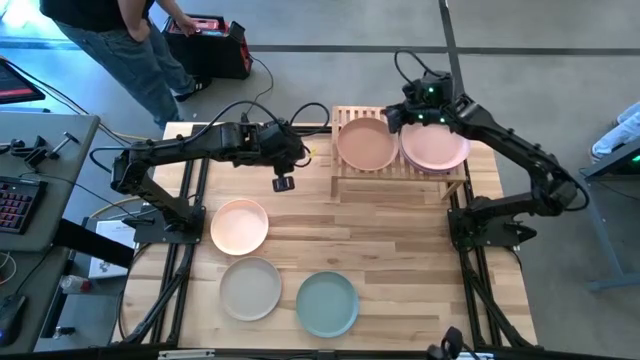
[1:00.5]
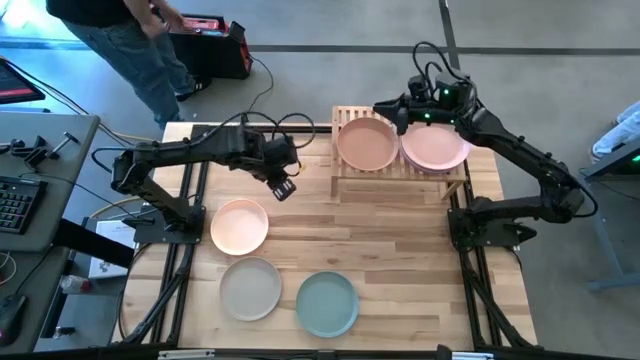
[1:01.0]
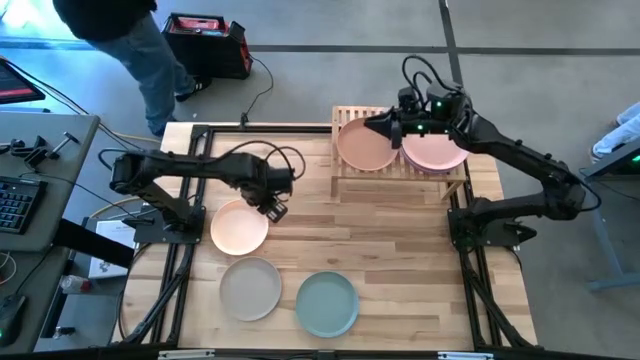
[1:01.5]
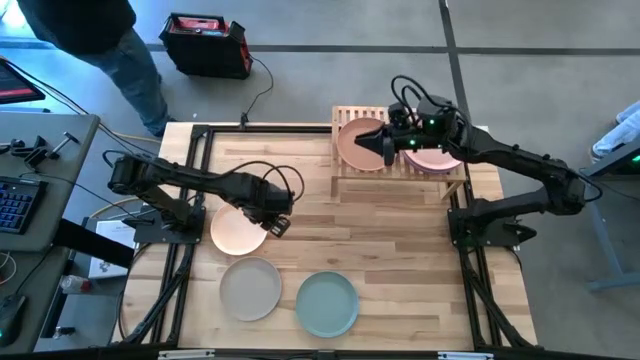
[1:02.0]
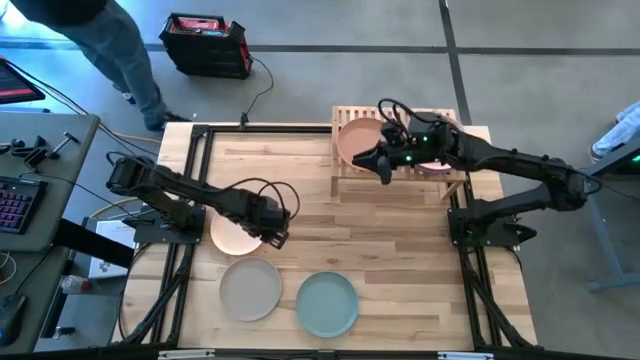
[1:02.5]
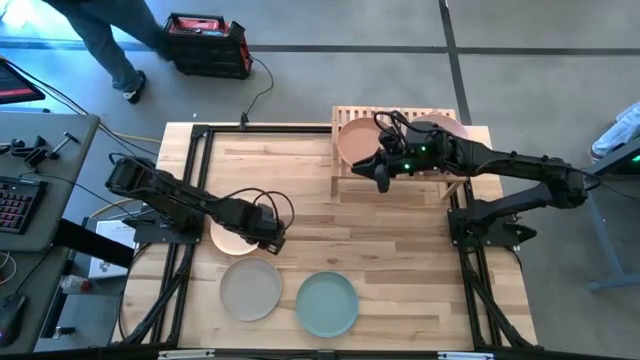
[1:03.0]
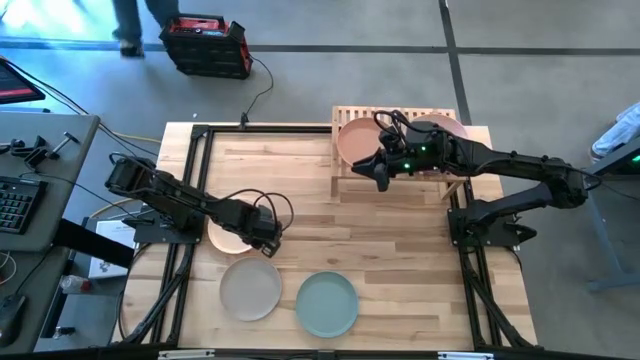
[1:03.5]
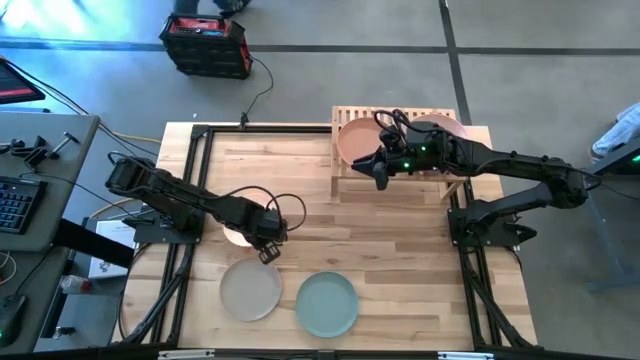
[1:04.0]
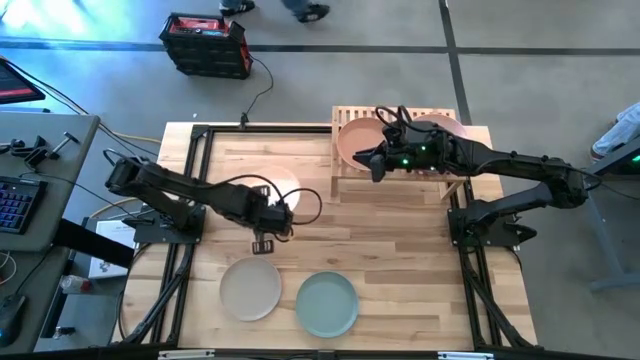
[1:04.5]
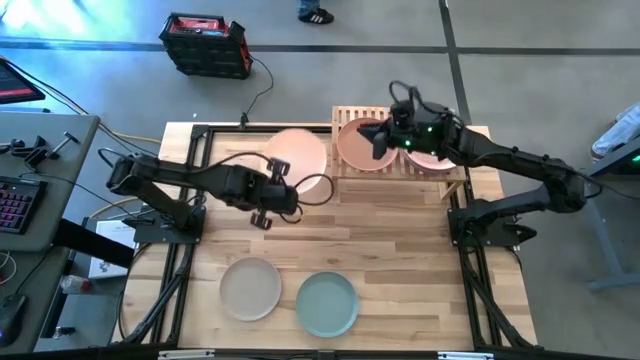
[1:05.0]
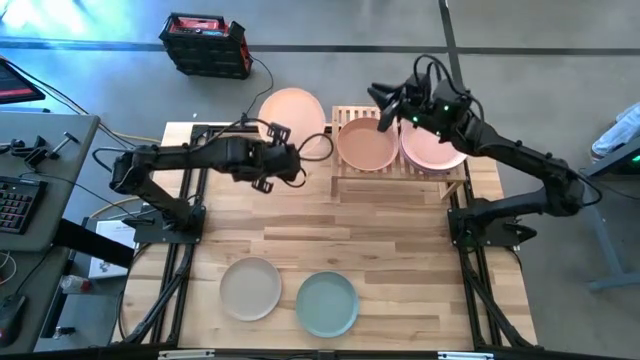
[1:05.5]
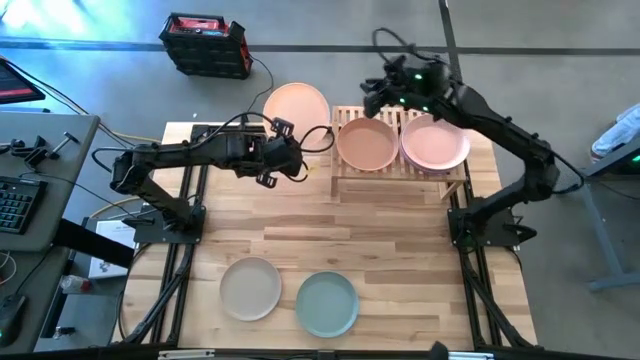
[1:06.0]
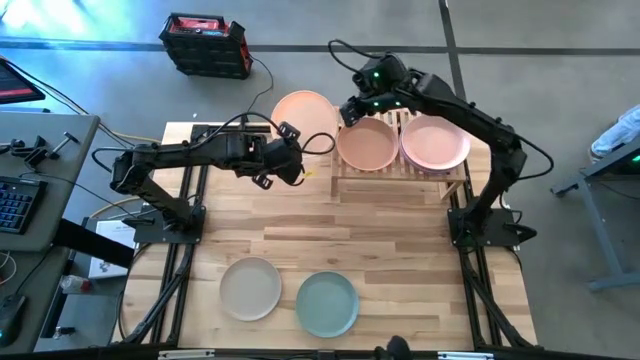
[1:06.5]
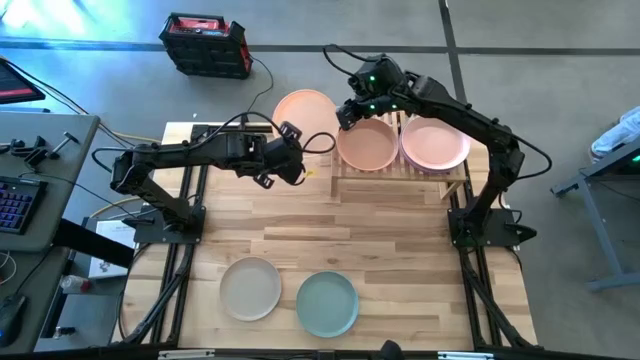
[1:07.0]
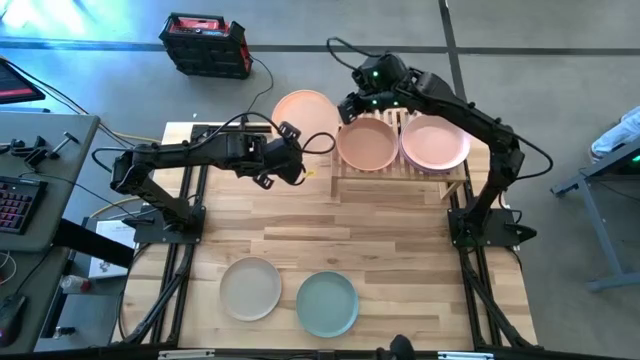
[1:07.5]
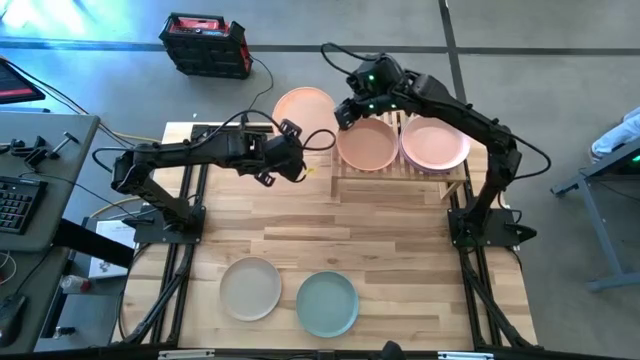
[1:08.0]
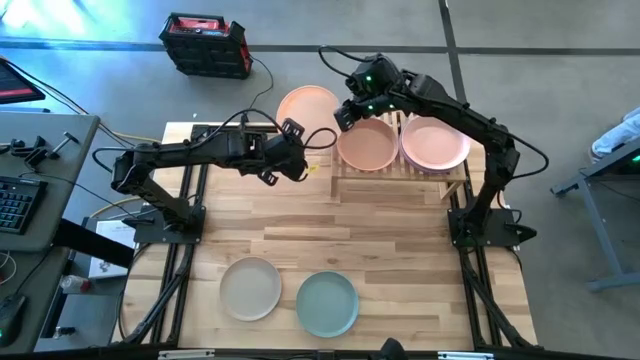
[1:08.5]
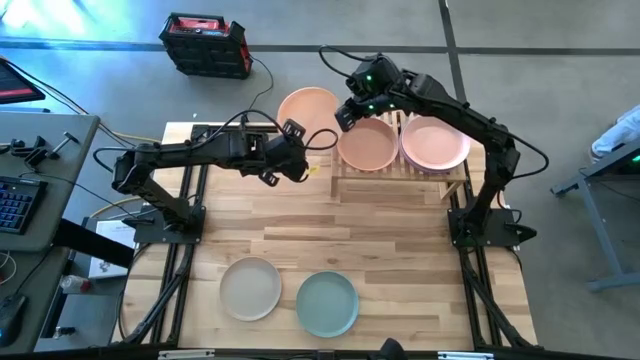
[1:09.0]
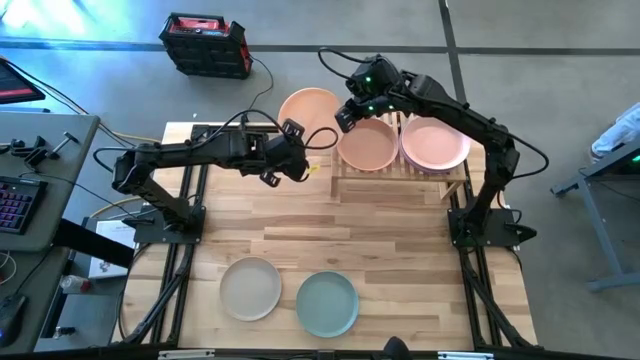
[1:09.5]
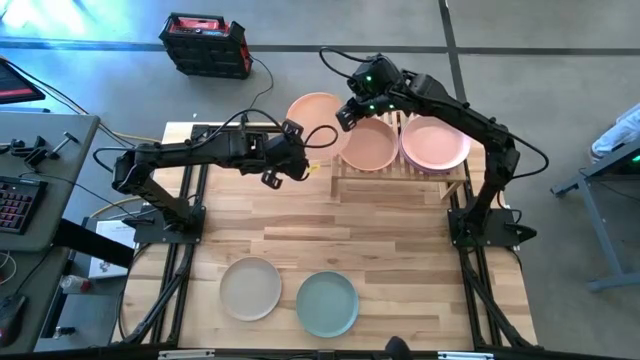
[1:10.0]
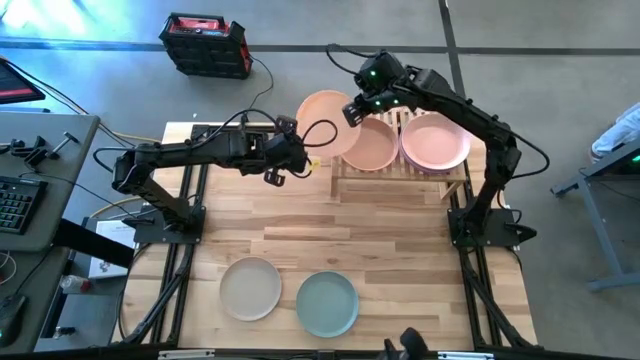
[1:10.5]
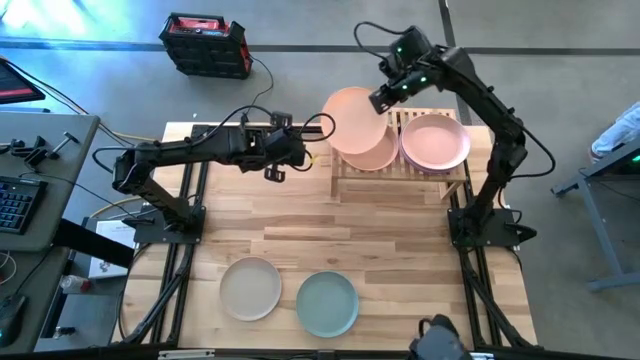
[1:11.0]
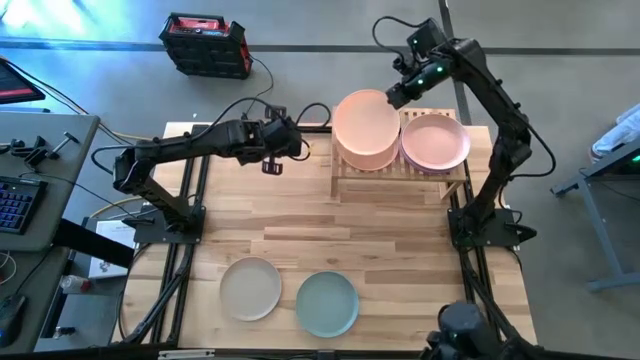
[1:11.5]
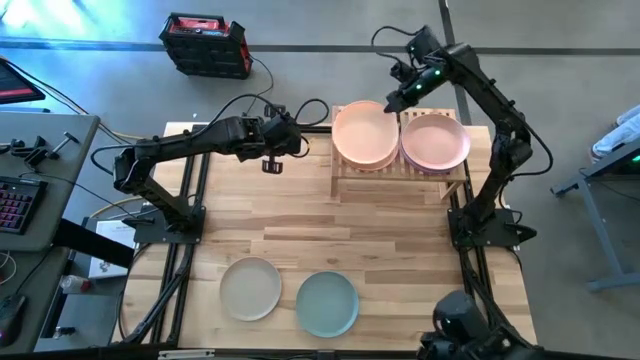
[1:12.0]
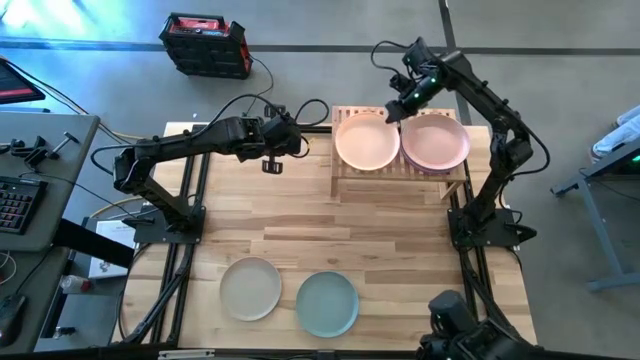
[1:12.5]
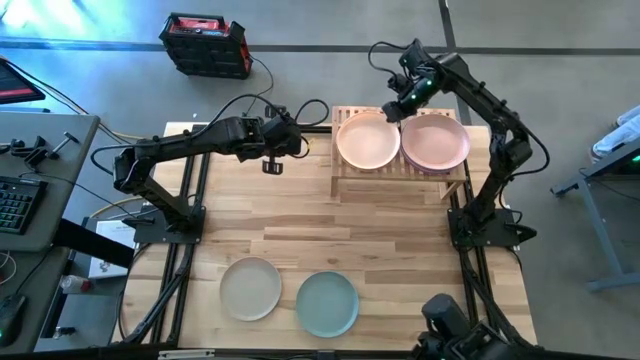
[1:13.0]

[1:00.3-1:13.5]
Task: Place and stack plates onto a shelf
Stack the light orange plate on top of the brown plate on the shelf

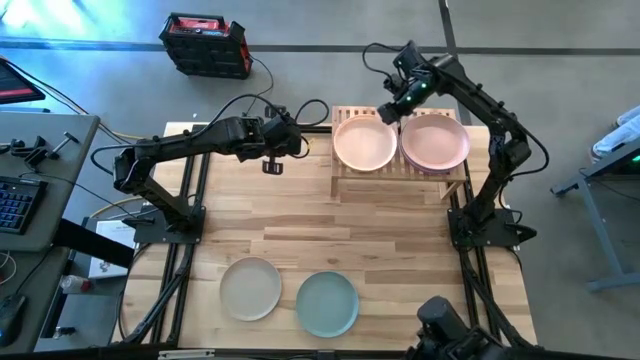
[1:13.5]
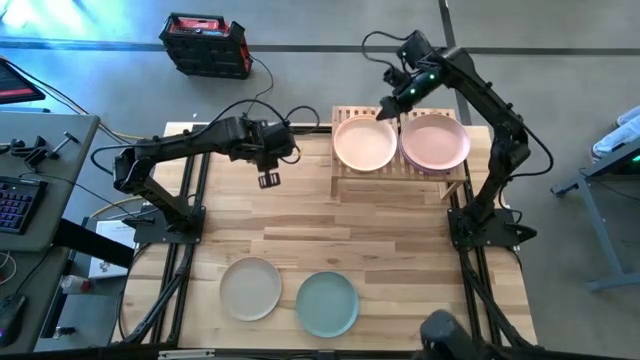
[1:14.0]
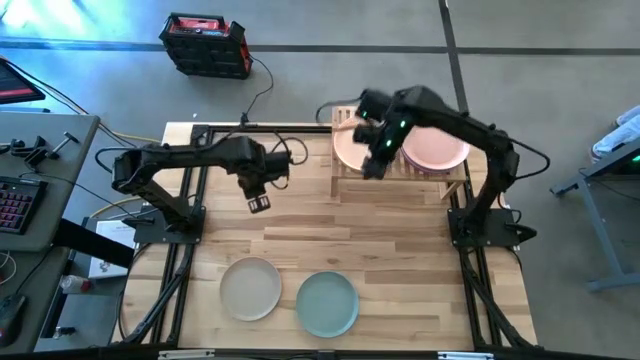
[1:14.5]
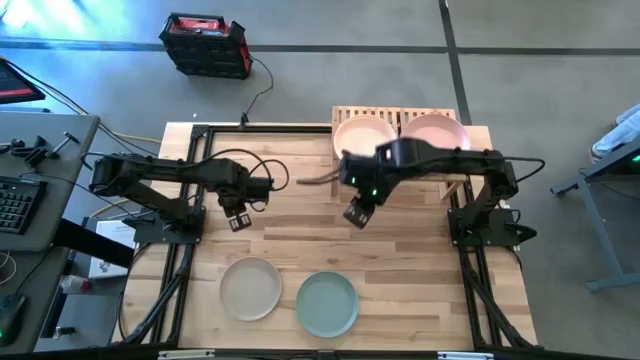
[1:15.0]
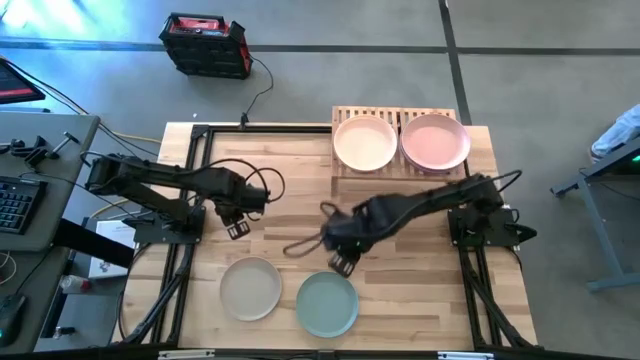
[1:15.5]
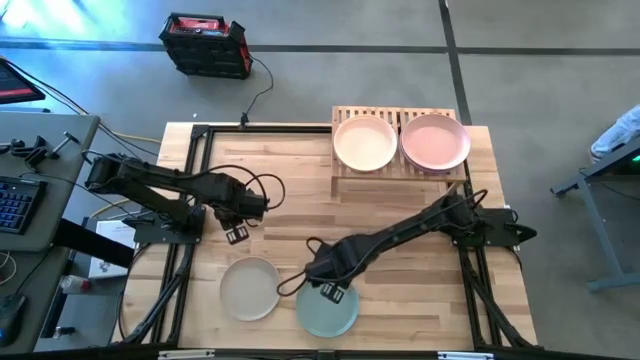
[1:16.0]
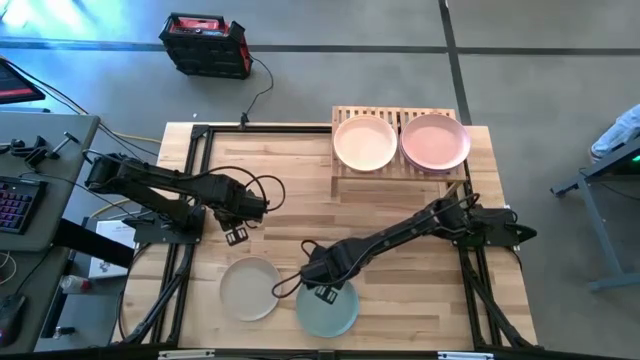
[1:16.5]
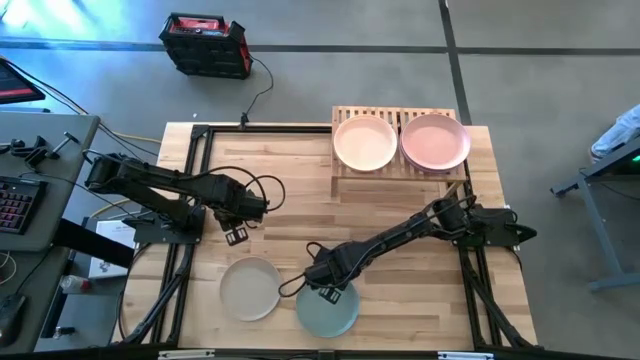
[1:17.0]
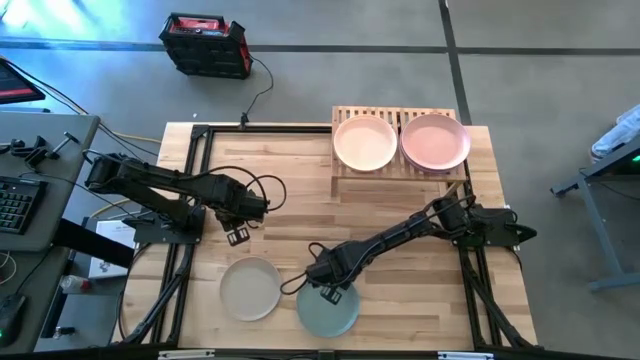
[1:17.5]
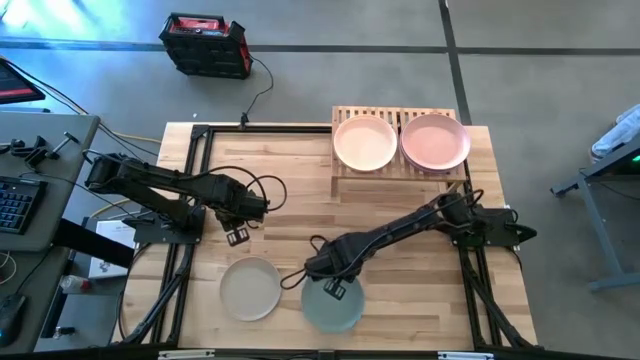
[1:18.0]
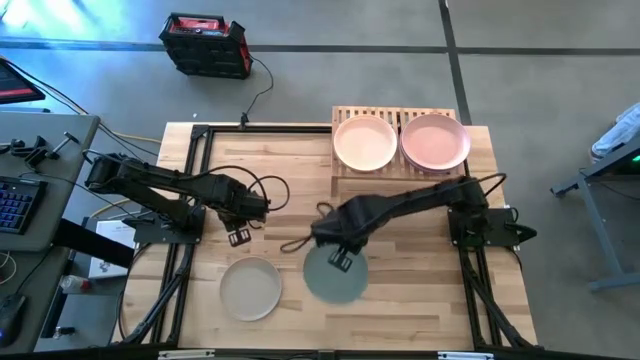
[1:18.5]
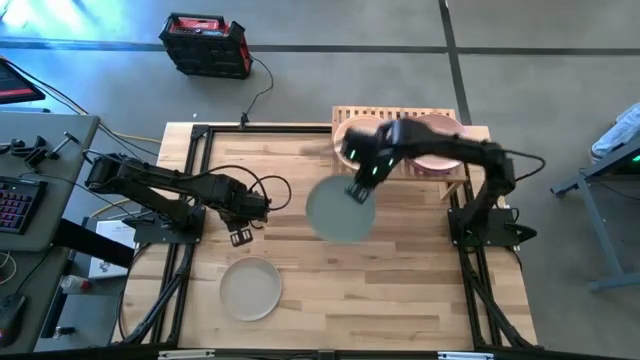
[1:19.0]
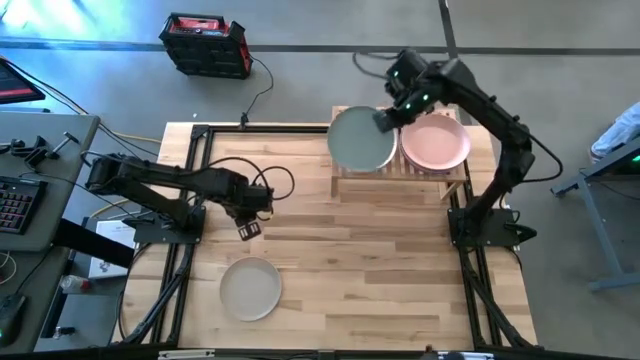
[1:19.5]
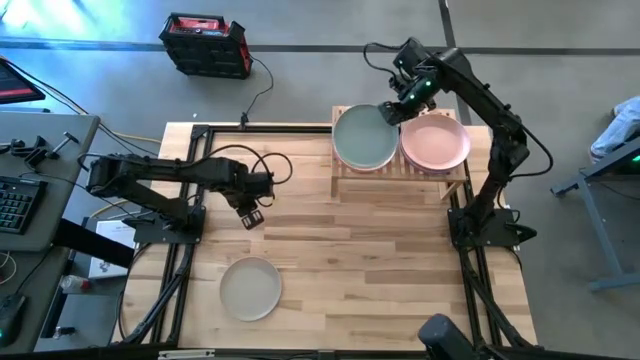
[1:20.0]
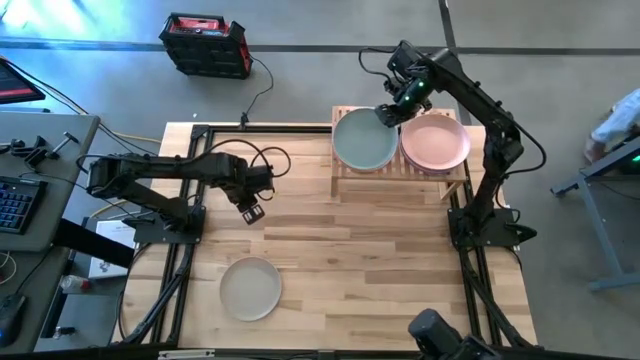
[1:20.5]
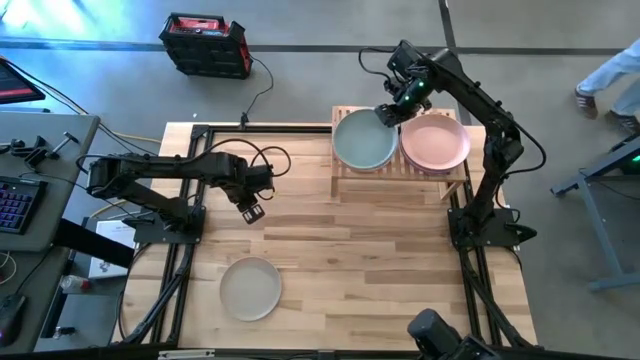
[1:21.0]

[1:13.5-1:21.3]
Stack the blue plate on top of the light orange plate on the shelf

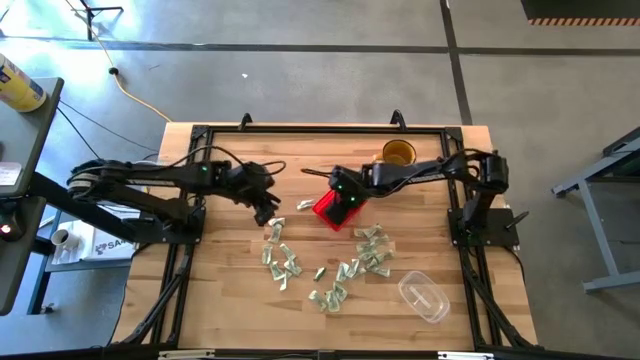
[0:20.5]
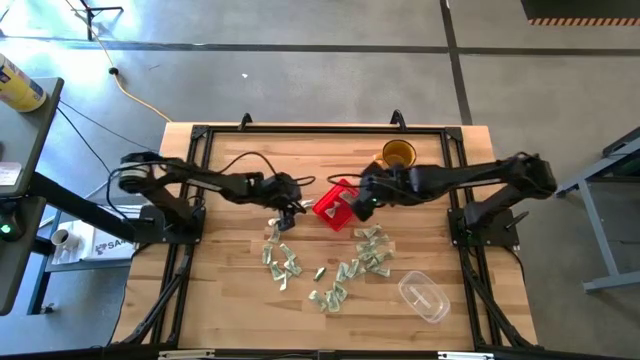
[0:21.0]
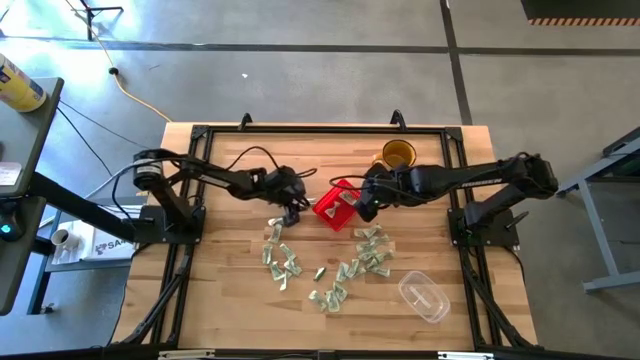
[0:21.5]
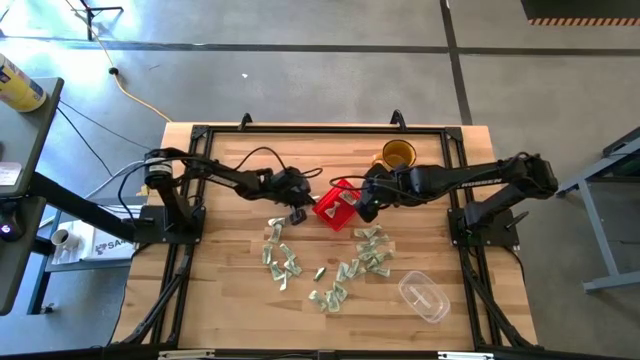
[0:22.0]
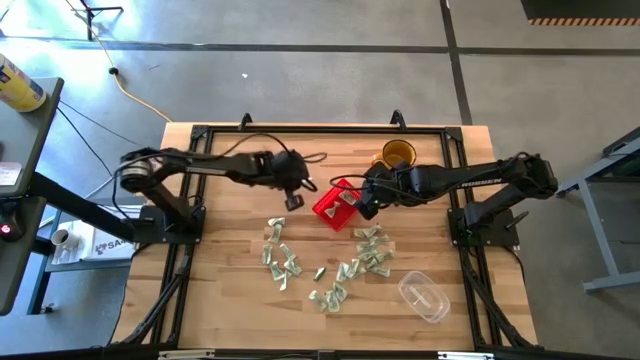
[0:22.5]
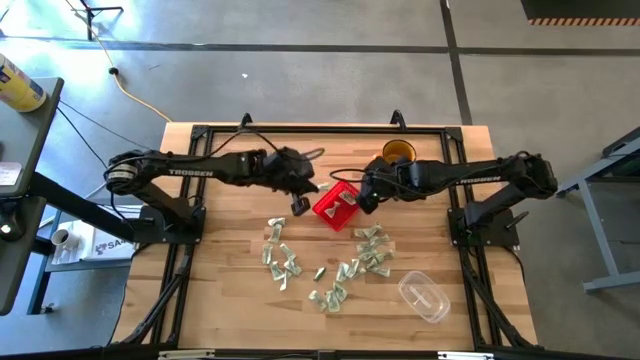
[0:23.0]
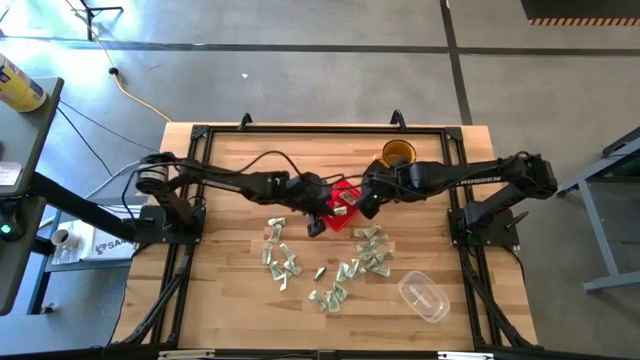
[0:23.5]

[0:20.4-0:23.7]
Task: Pick and place items into bin
Put the white stevia packet into the red bin
